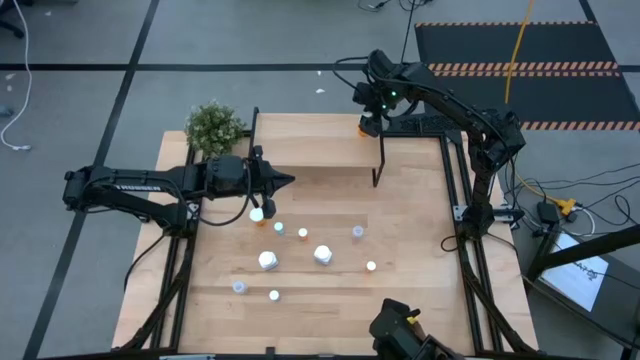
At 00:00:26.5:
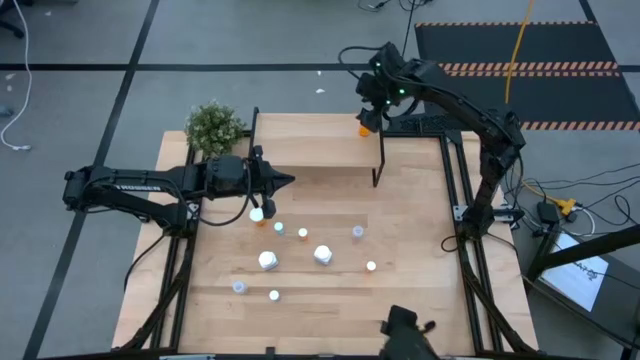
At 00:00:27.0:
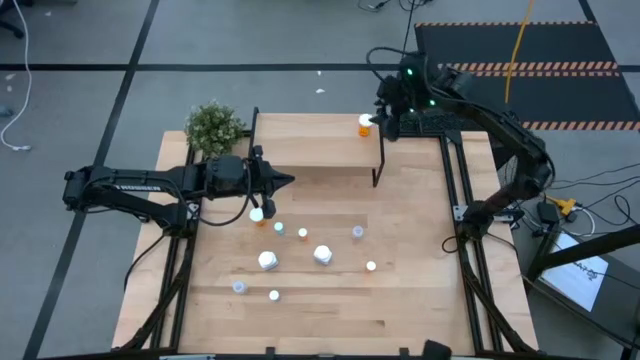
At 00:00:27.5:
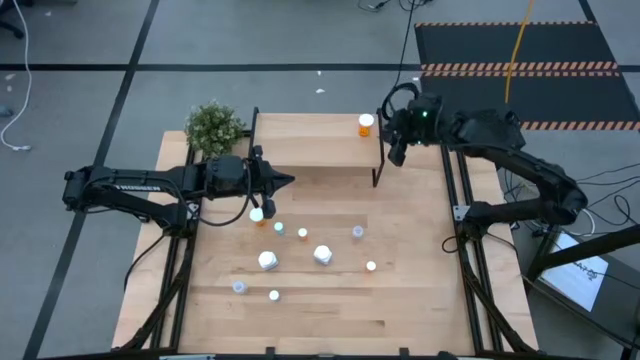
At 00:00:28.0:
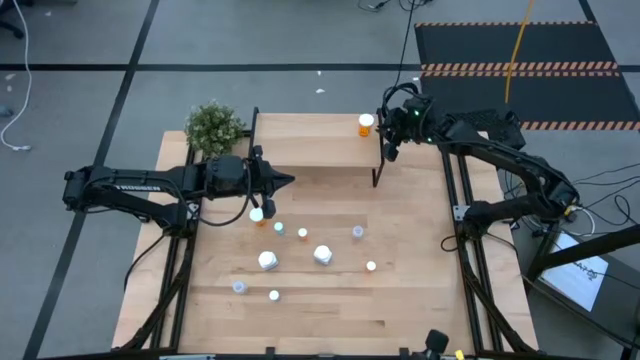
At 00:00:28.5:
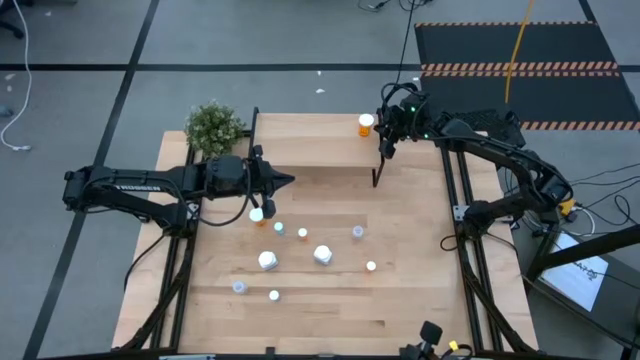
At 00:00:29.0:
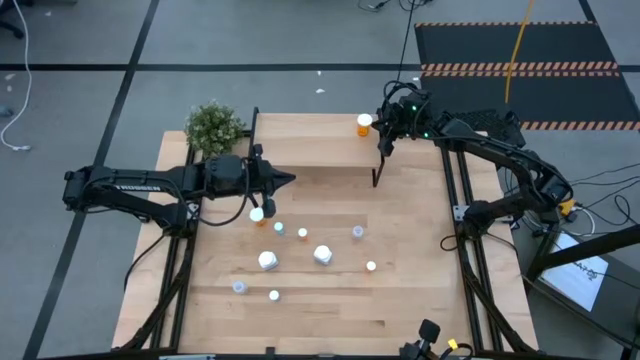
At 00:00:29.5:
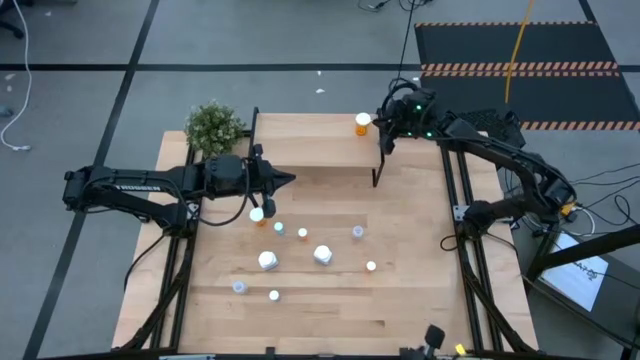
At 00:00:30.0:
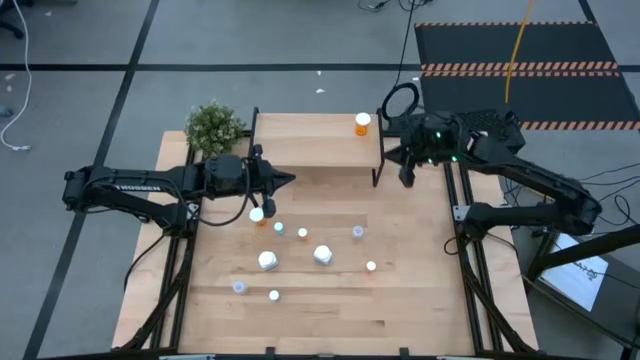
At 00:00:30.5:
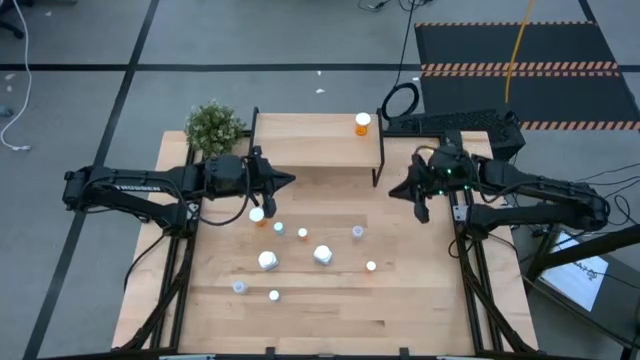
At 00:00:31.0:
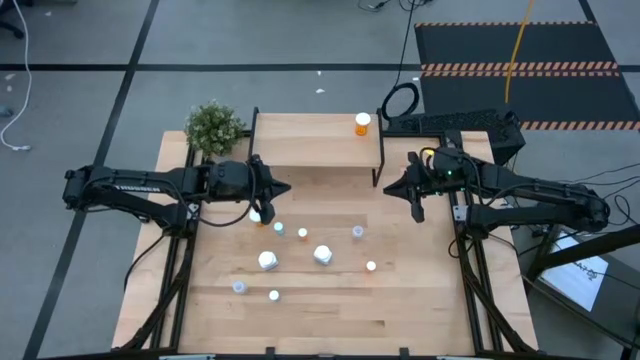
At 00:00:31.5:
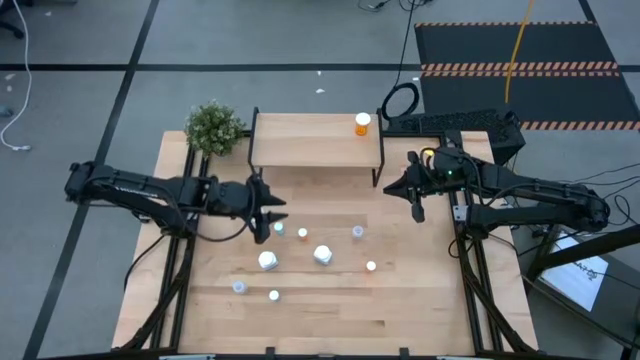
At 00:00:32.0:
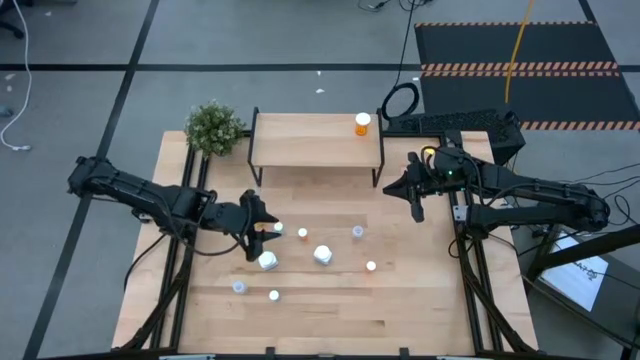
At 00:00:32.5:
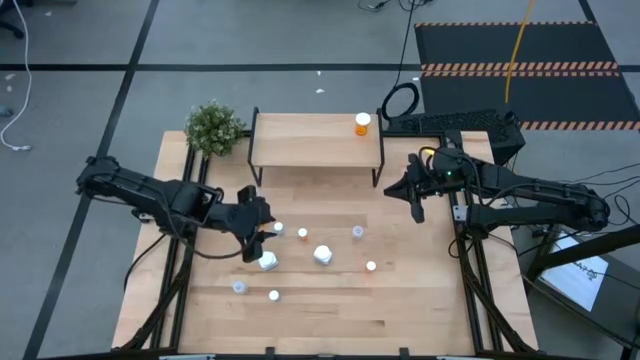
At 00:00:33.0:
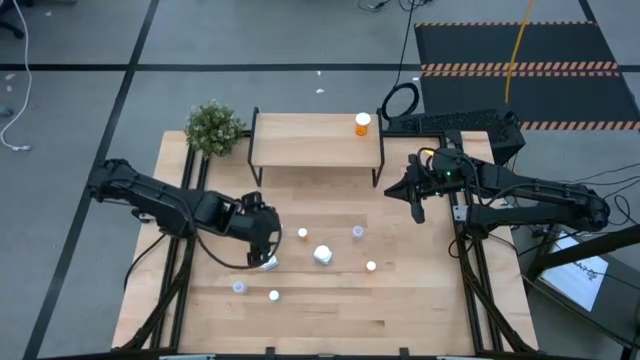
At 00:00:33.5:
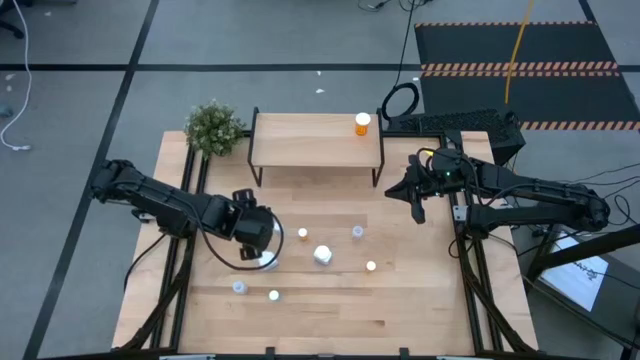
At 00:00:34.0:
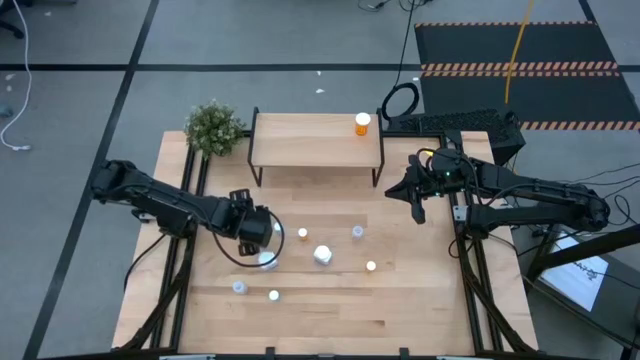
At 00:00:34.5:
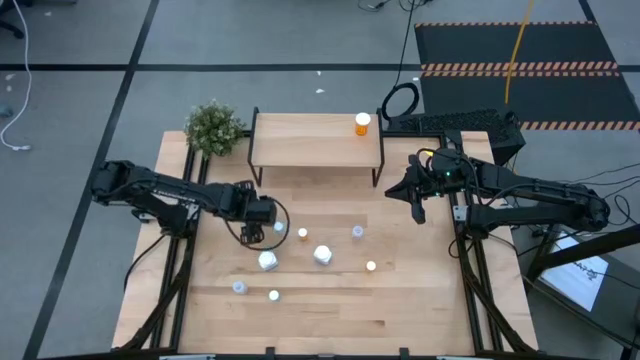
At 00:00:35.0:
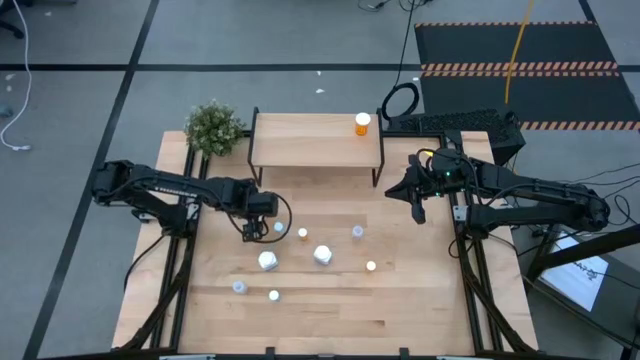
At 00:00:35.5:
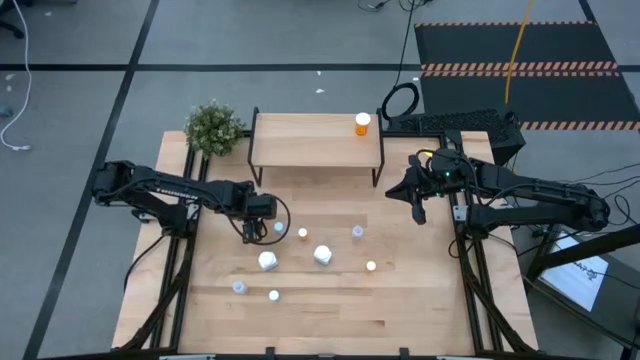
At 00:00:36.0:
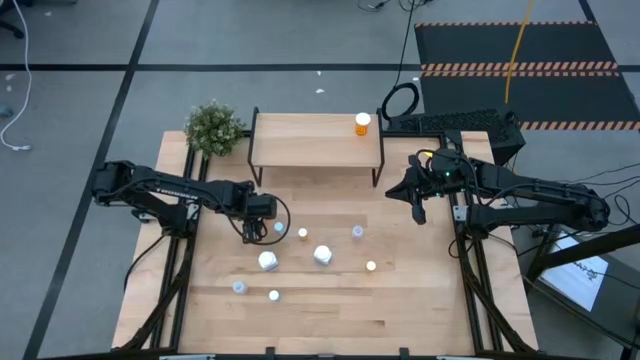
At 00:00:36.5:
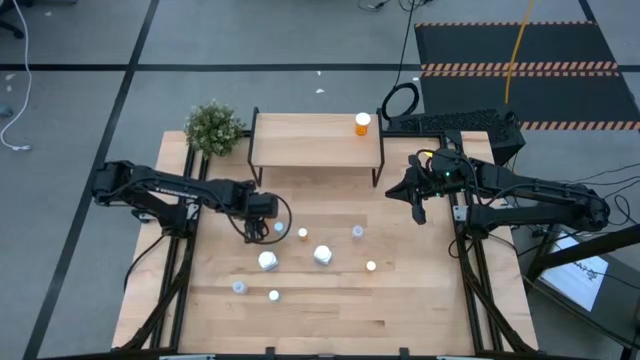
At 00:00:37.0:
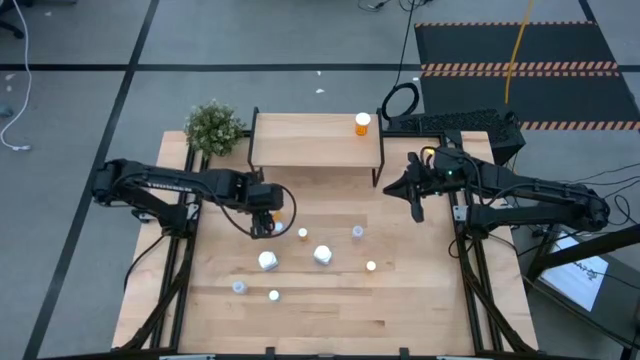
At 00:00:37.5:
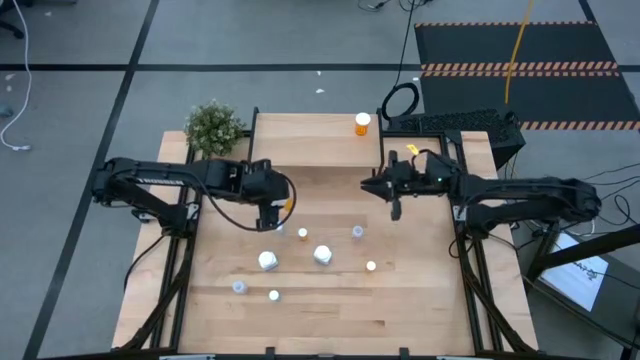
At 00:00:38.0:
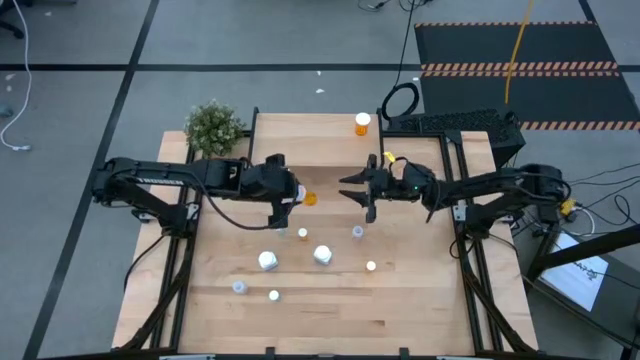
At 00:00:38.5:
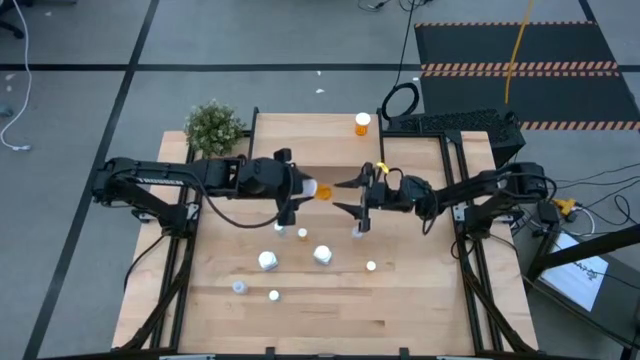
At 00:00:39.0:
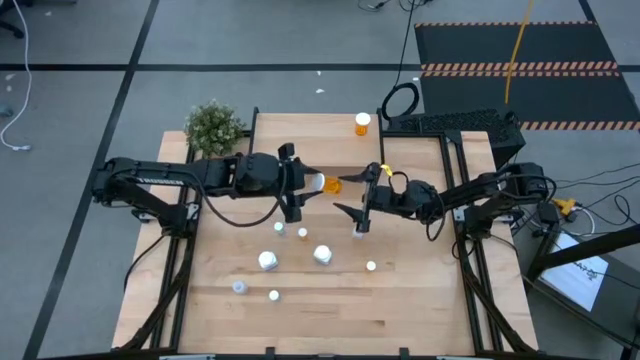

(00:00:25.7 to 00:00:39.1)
Task: Pick and place medicine bottles onto shelf by color
Put the big orange pill bottle on the shelf aligned with the big orange pill bottle

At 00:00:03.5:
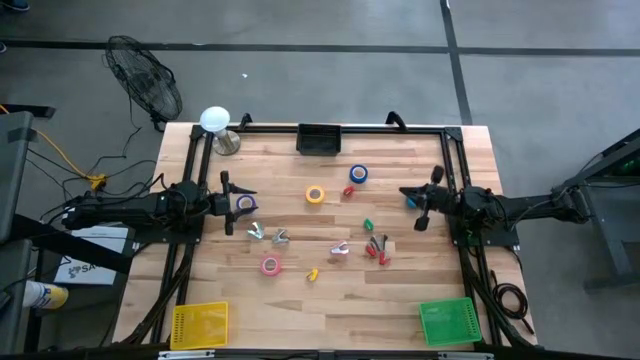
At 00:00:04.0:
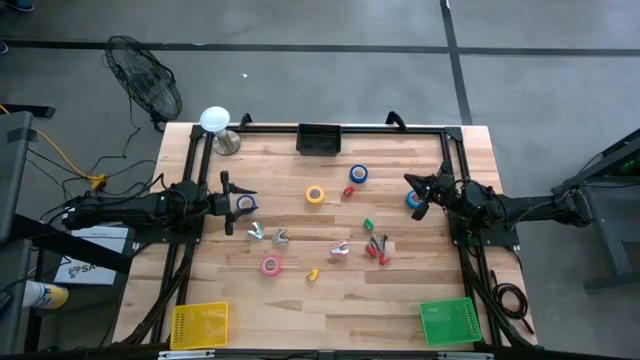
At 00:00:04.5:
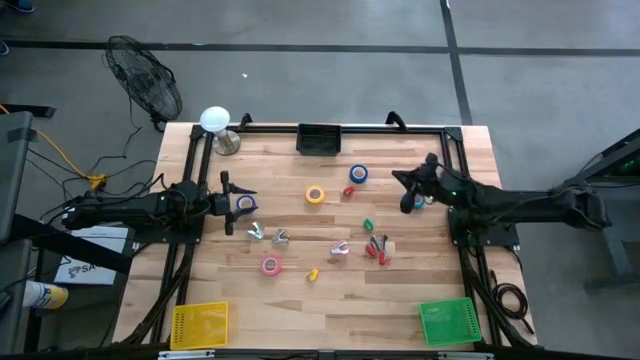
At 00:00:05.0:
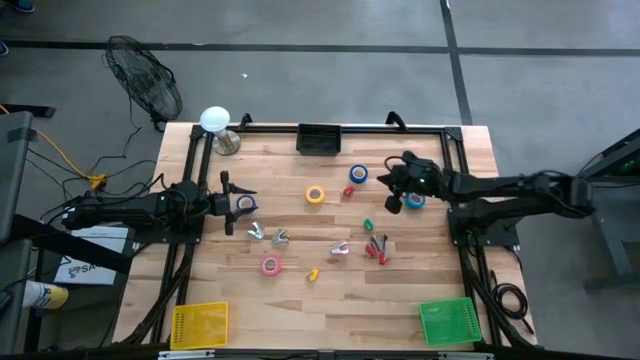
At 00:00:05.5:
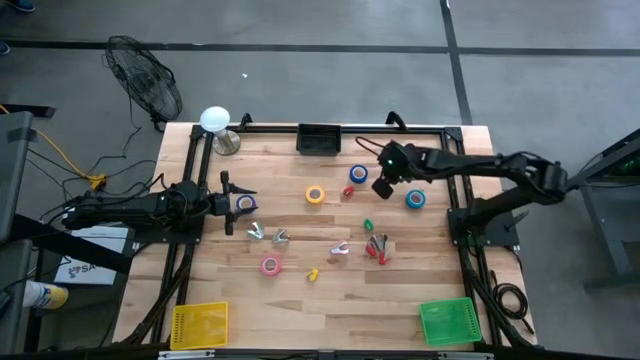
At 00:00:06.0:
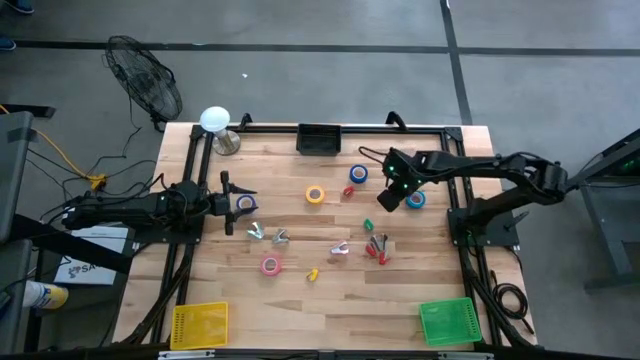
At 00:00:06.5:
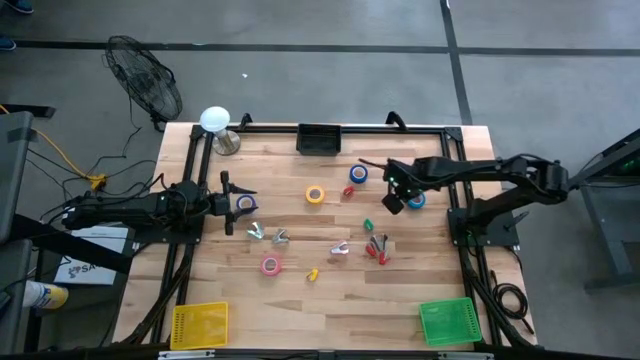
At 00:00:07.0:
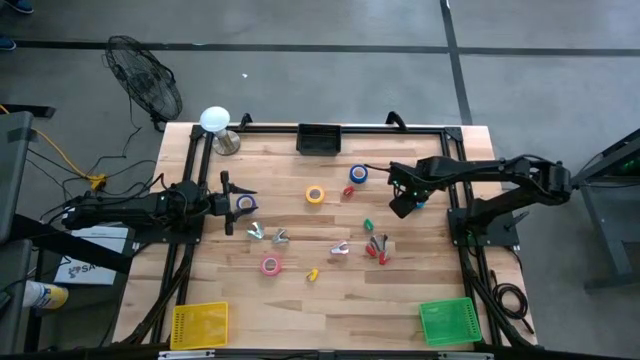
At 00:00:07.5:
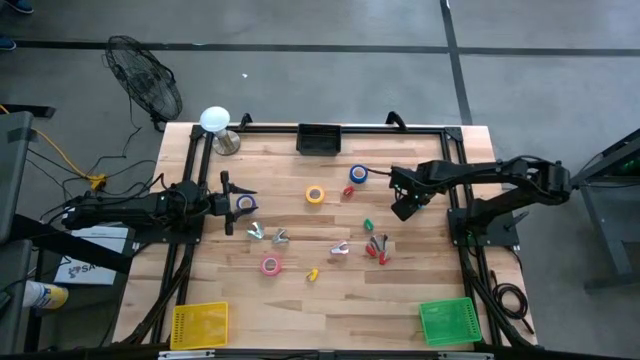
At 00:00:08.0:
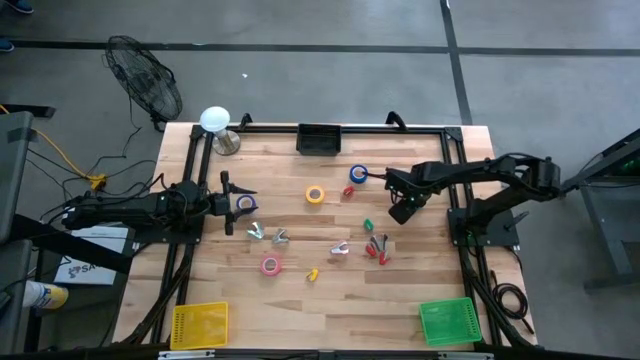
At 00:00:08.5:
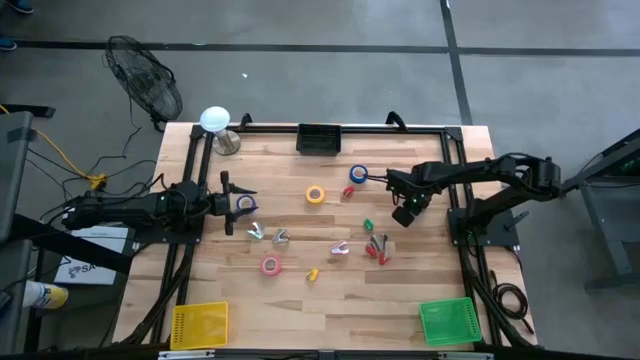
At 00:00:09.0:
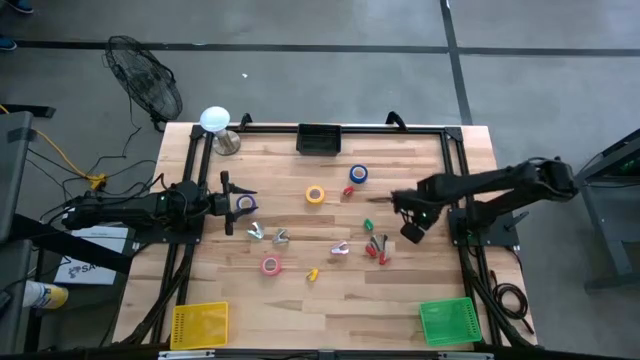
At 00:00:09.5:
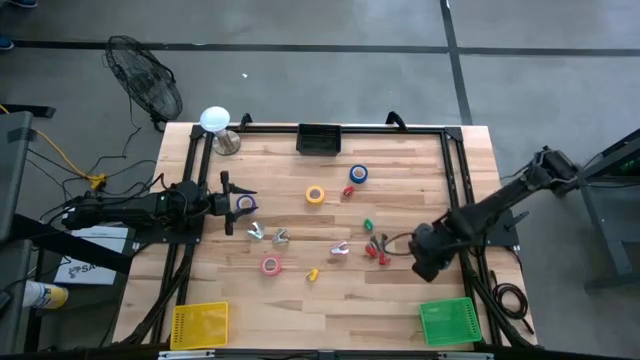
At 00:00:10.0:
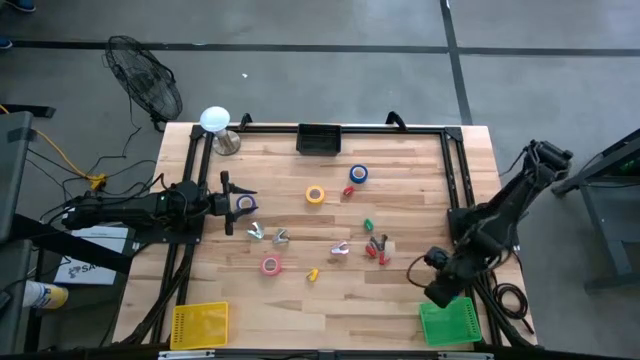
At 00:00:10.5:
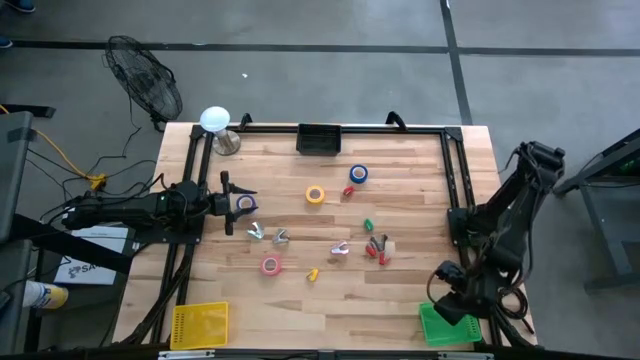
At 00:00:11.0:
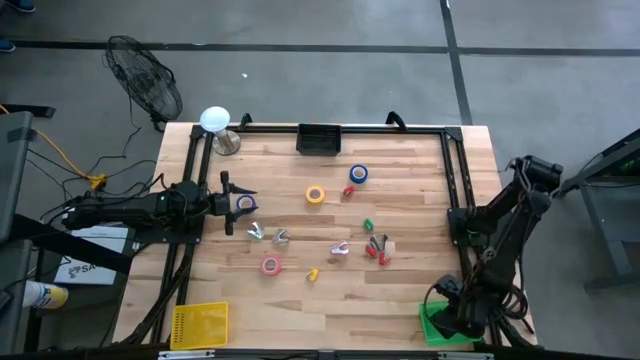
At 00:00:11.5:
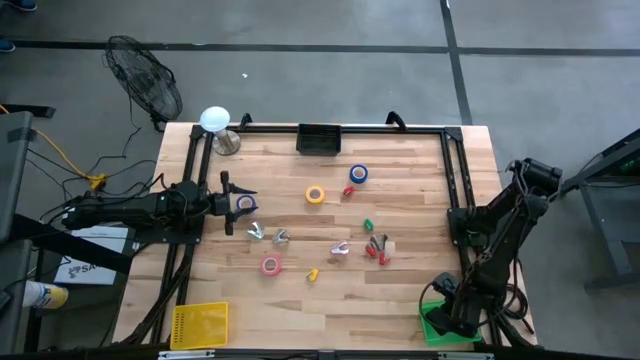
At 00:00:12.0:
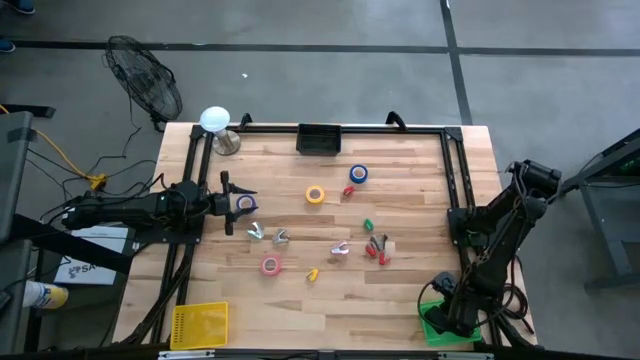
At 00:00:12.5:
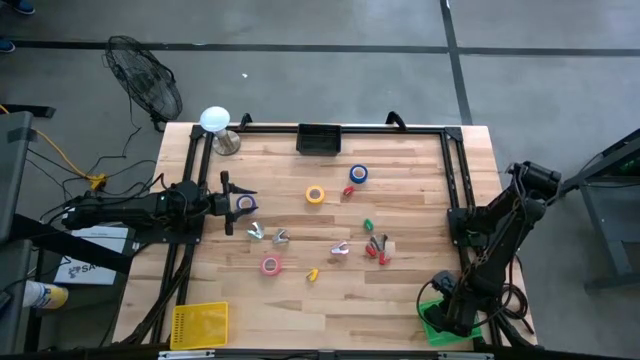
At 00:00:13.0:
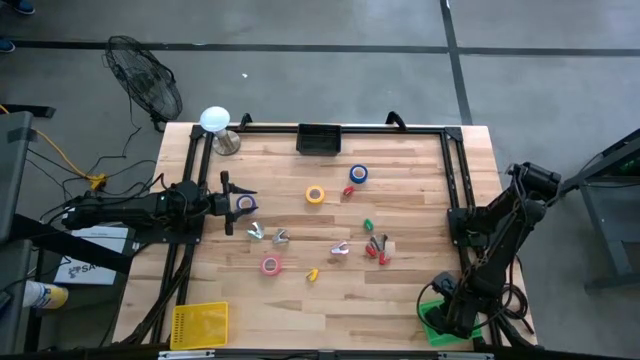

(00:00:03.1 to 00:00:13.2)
Task: Pick and place Stapler, Stapler remover, tape
Put the light blue tape into the green bin
